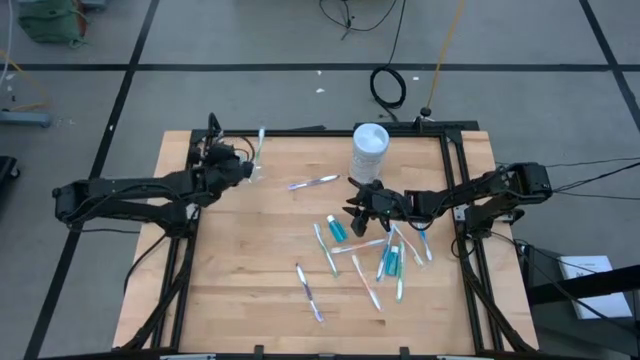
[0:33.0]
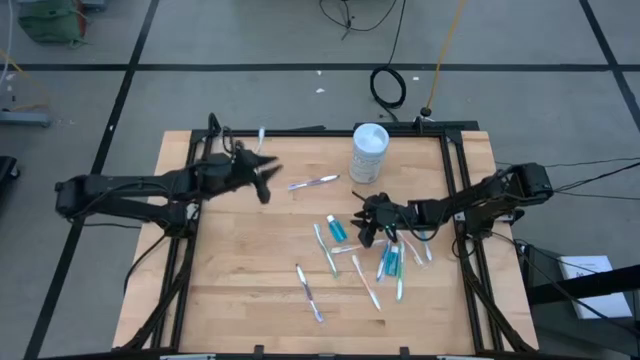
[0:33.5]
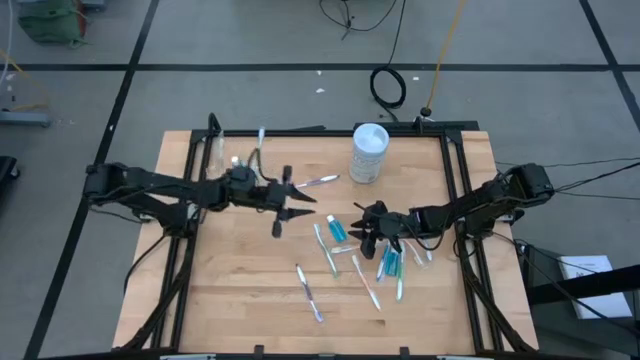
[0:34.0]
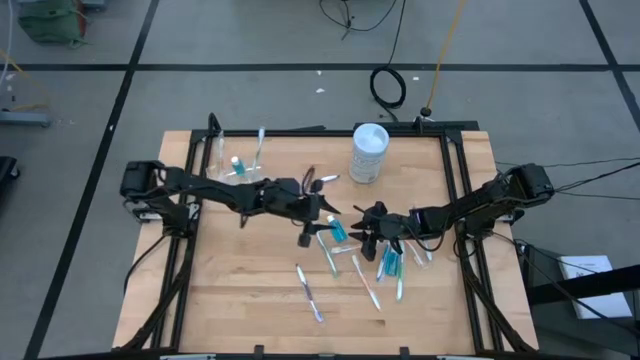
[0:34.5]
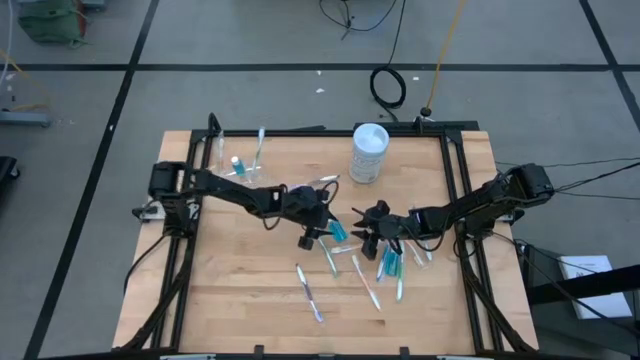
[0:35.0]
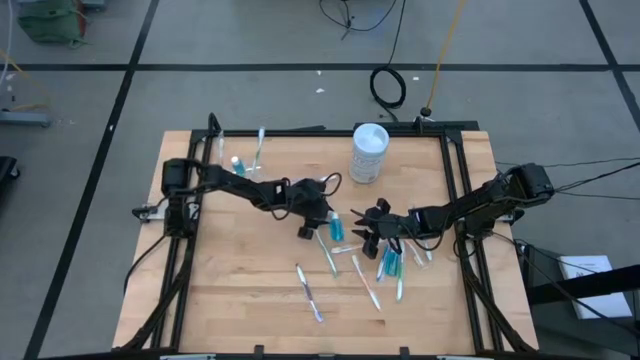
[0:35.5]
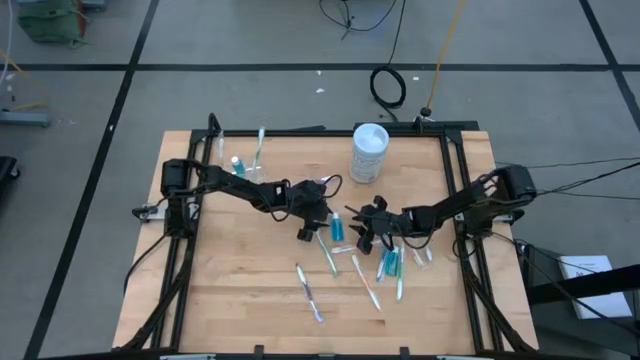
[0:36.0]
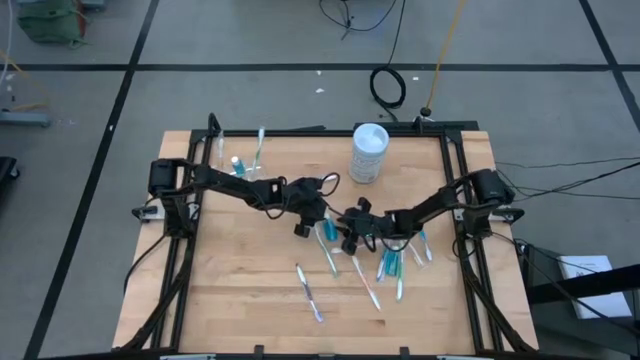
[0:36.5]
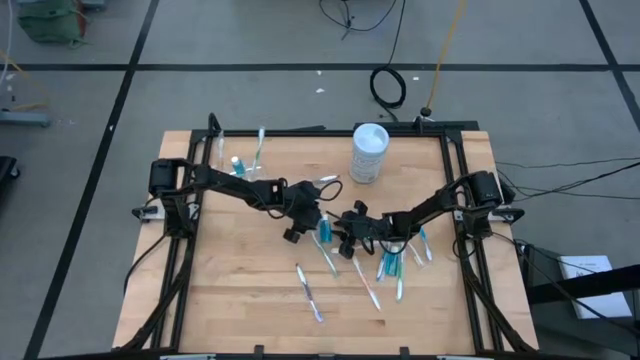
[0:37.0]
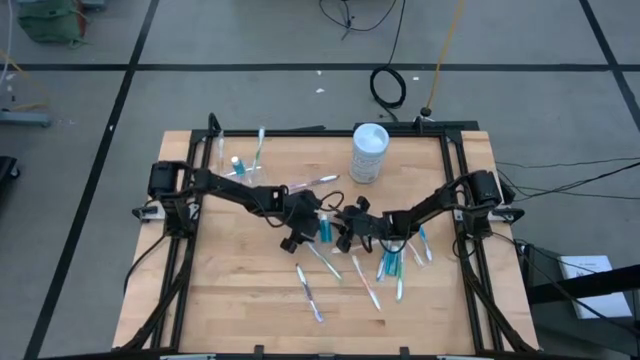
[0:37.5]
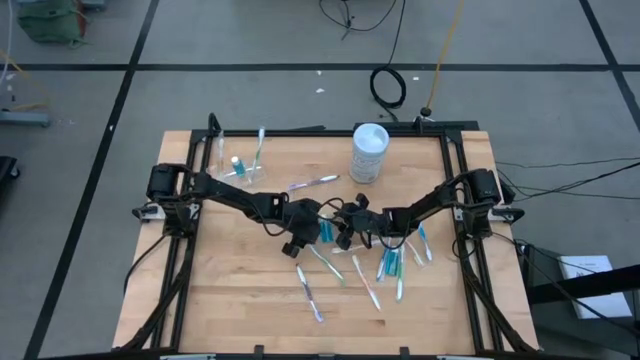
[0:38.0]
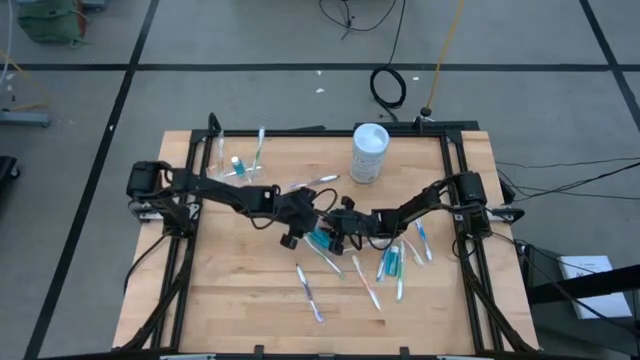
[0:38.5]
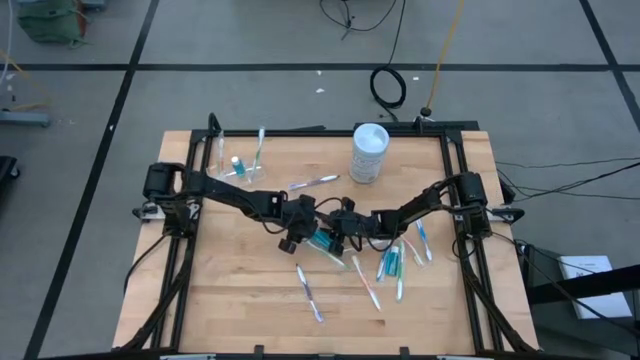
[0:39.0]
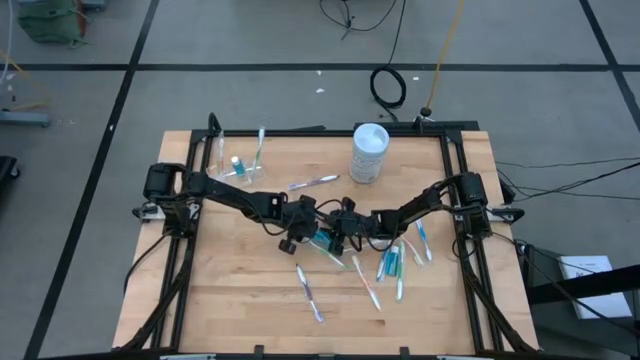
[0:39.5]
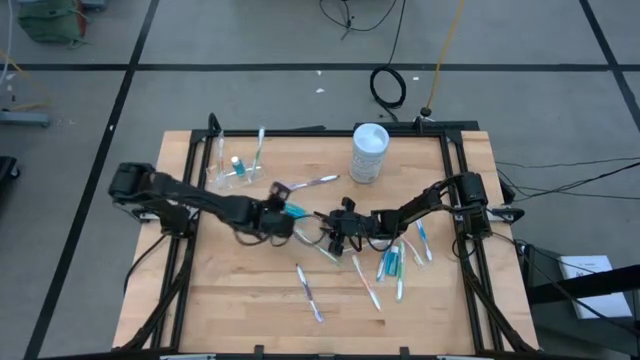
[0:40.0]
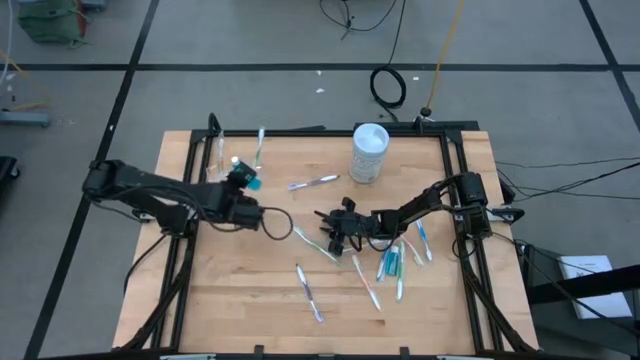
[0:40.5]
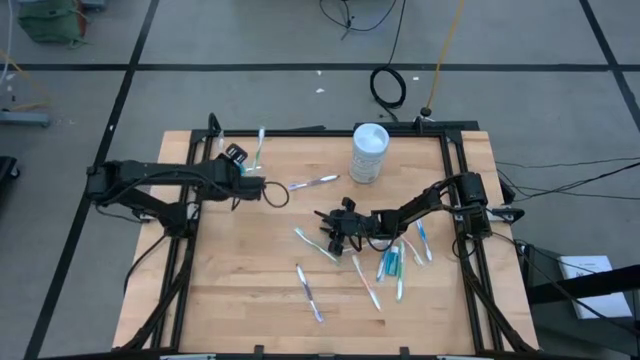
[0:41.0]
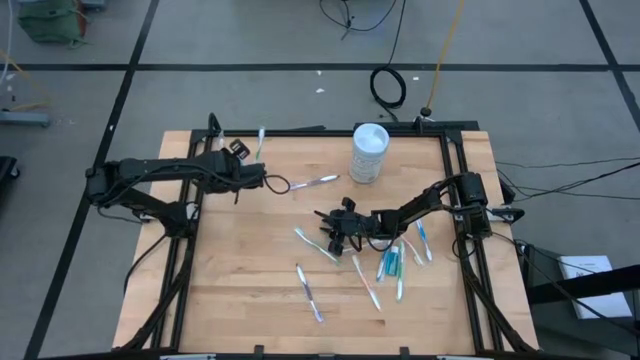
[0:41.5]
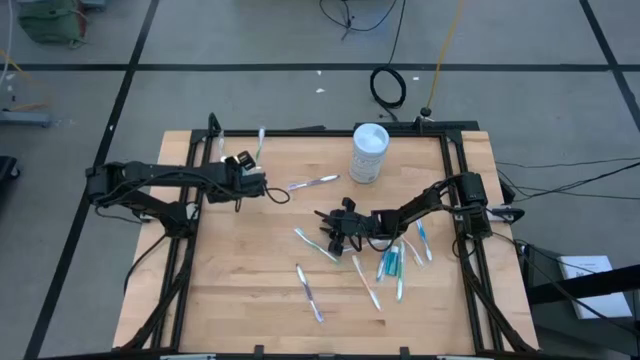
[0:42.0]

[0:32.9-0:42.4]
Task: Pick & Place toothbrushing station
Put the mouthwash into the transparent organizer

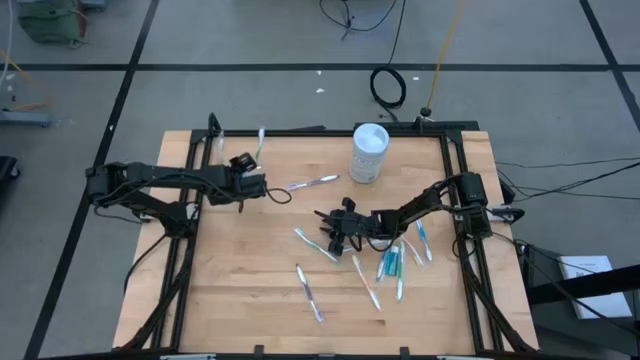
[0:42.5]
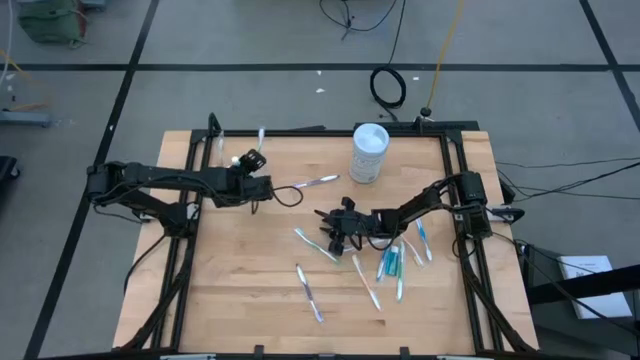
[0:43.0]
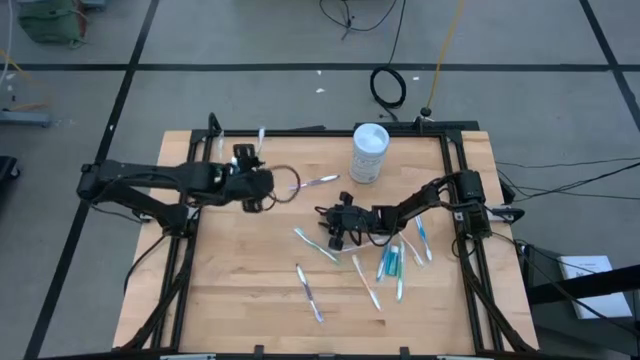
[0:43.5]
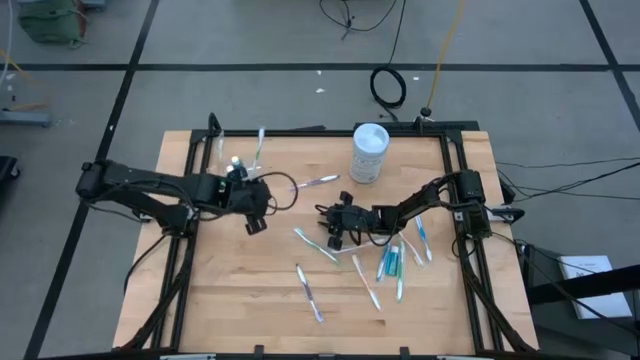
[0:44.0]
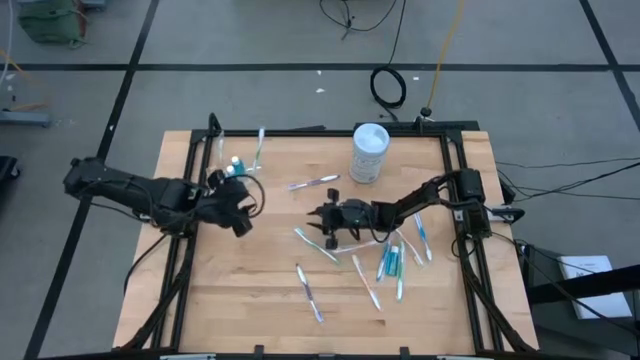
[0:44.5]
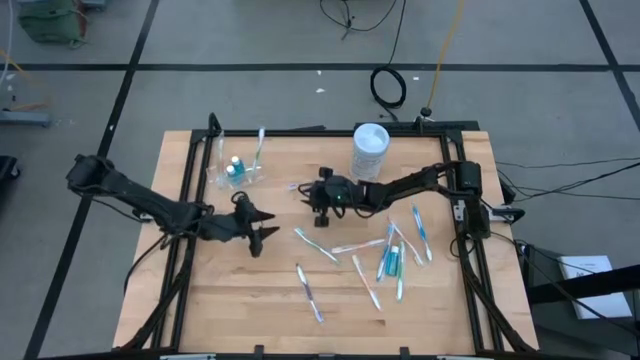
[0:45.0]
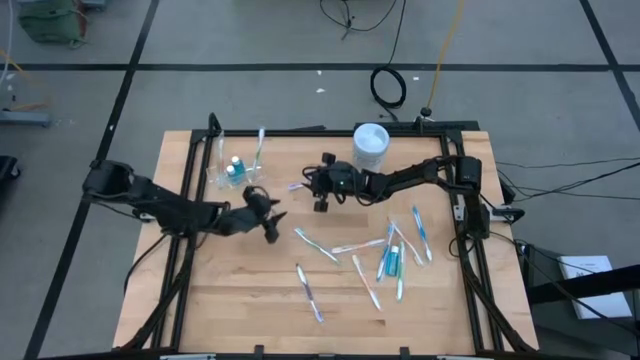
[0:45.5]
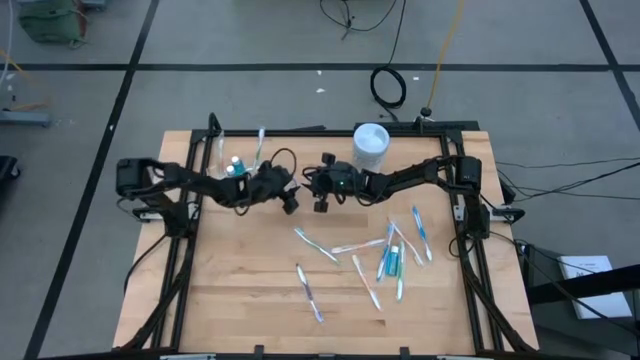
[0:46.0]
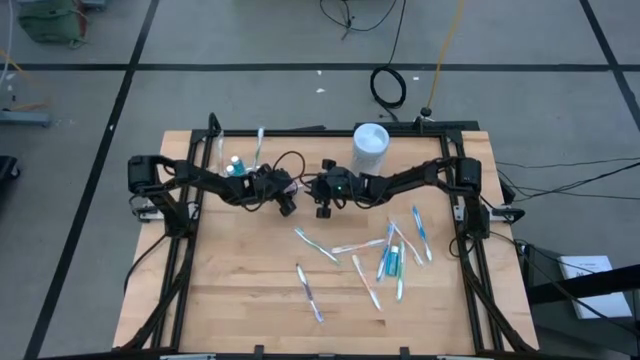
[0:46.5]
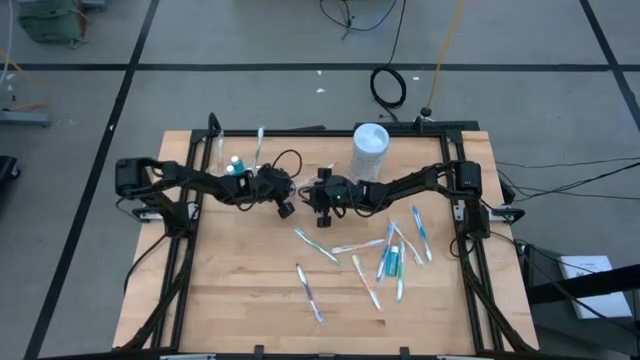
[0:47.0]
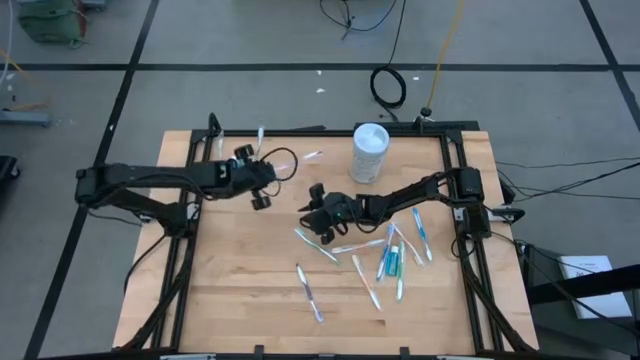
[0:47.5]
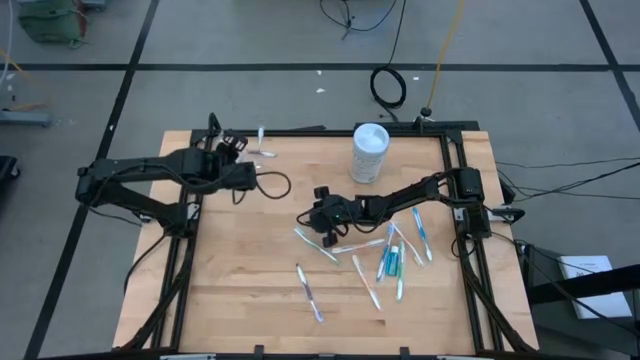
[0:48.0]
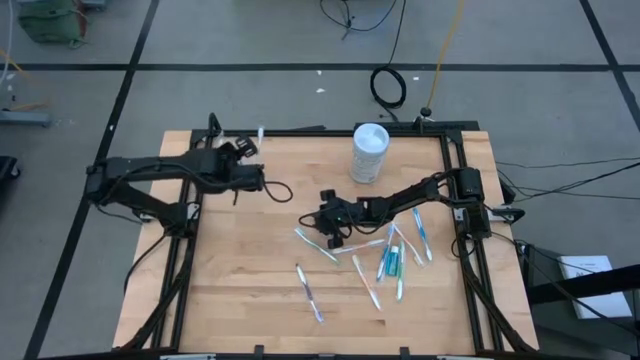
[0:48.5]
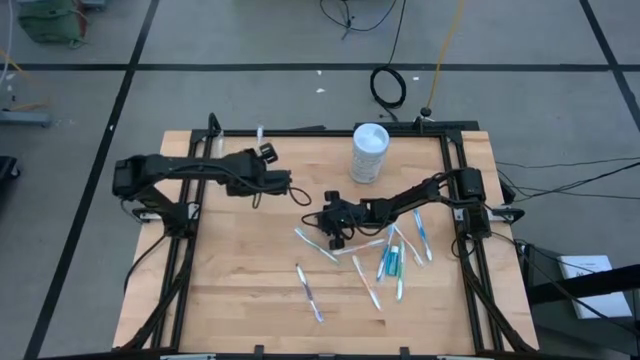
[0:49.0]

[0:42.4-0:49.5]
Put the violet toothbrush into the transparent organizer

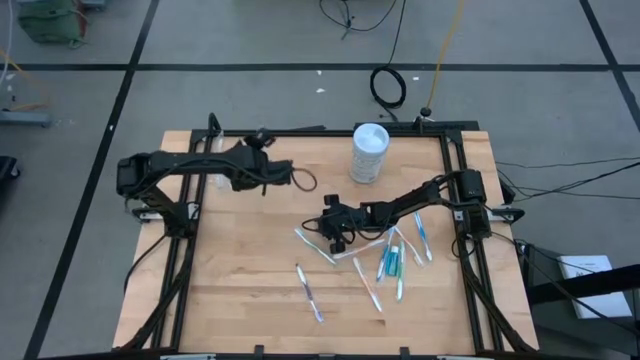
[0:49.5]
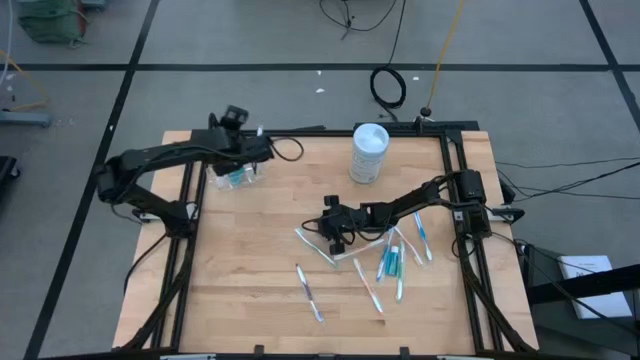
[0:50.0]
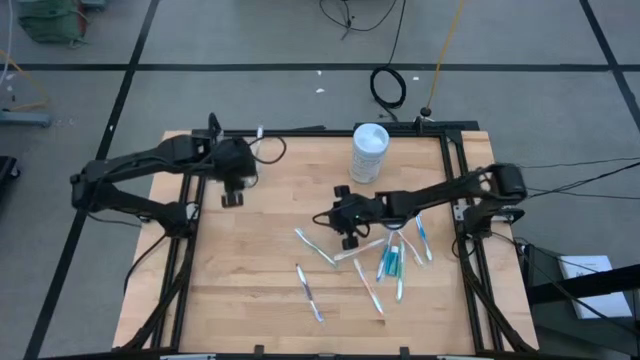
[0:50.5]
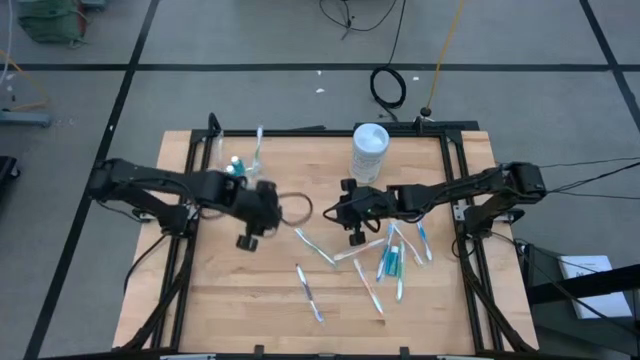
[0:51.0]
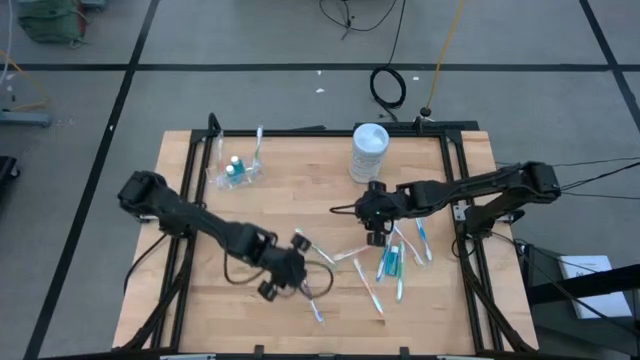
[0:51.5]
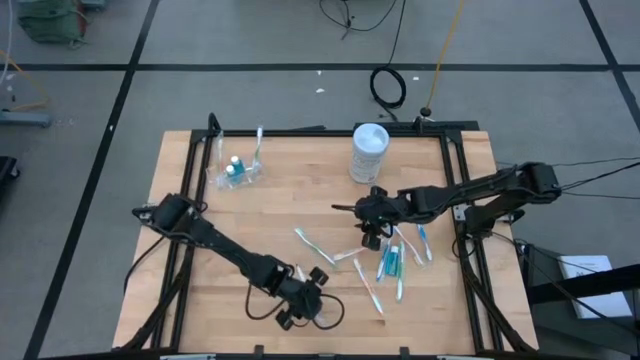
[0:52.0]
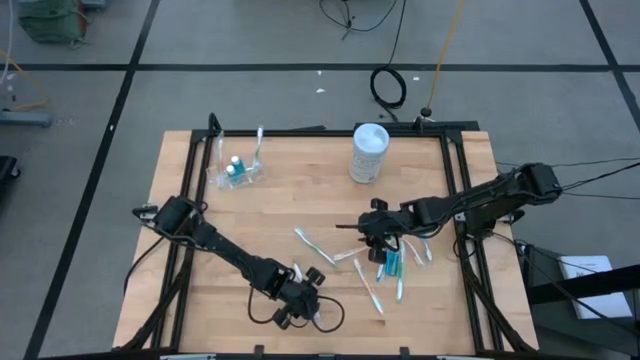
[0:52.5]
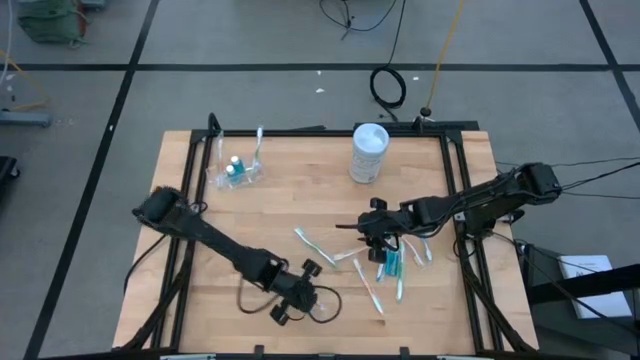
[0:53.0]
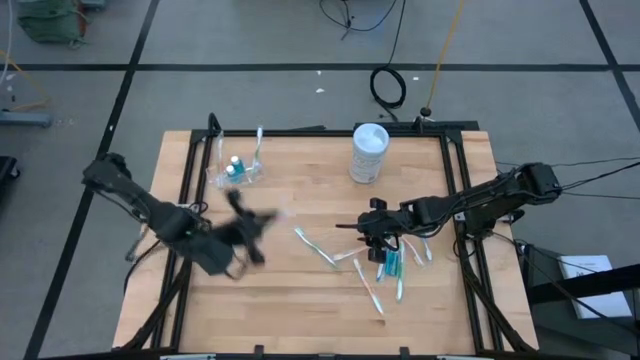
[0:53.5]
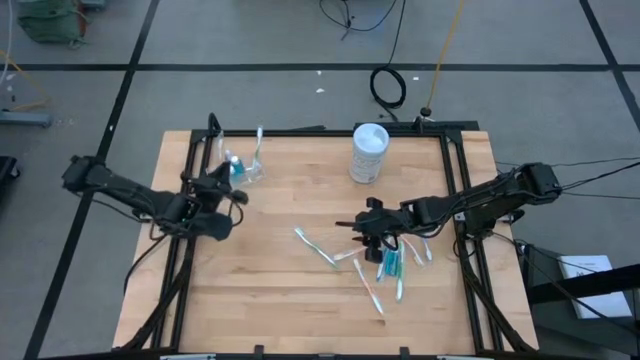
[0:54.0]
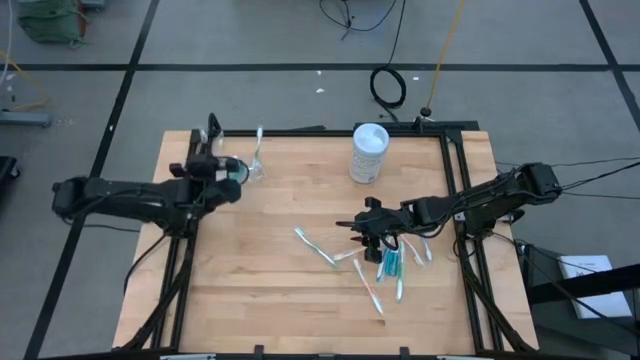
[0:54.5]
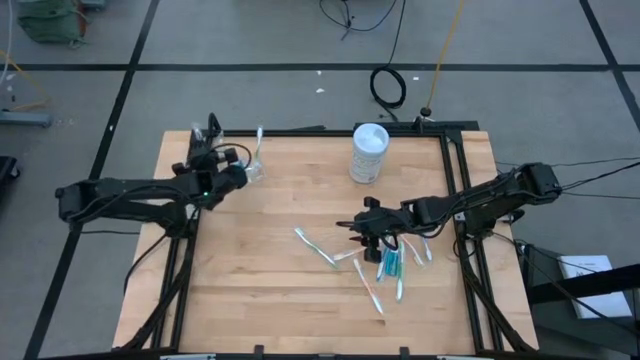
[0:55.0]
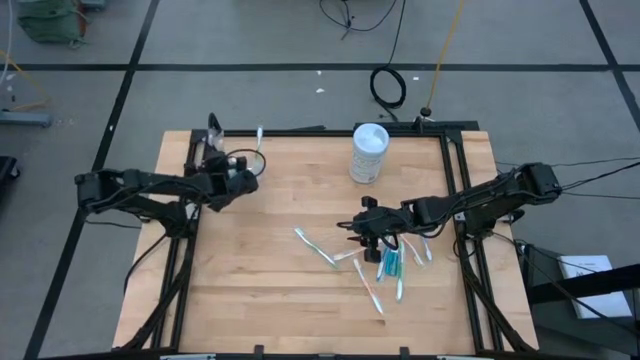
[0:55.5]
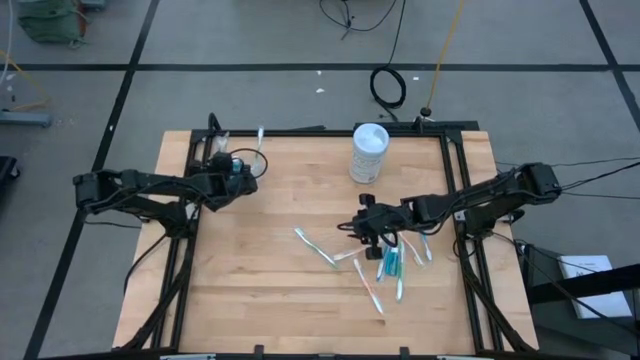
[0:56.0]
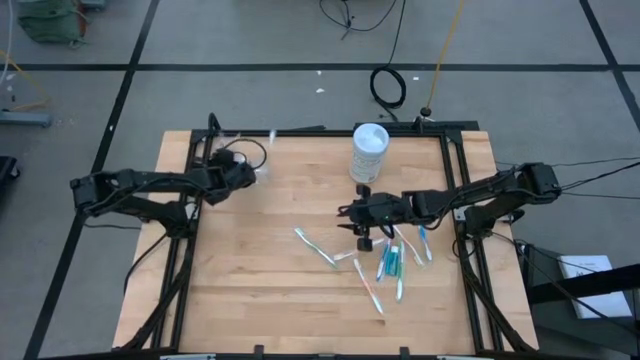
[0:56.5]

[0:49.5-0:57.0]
Put the violet toothbrush into the transparent organizer
